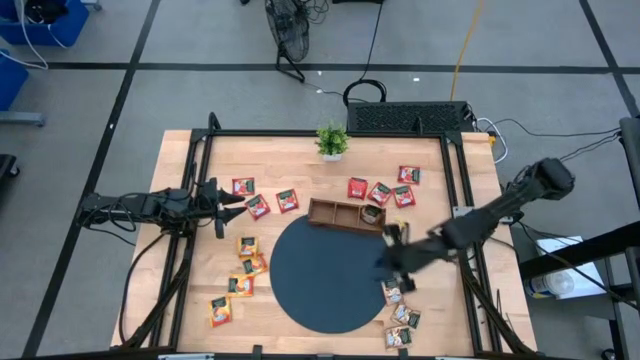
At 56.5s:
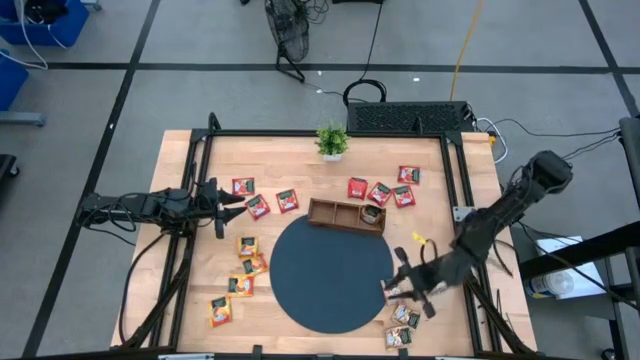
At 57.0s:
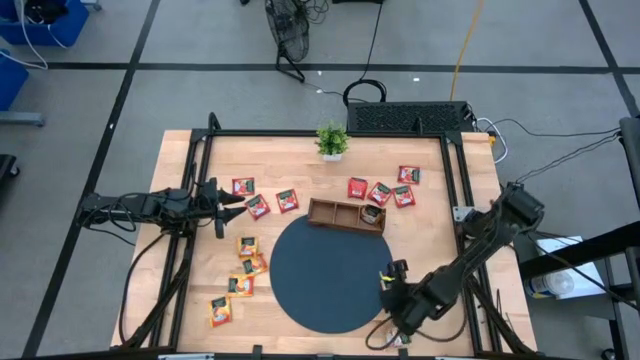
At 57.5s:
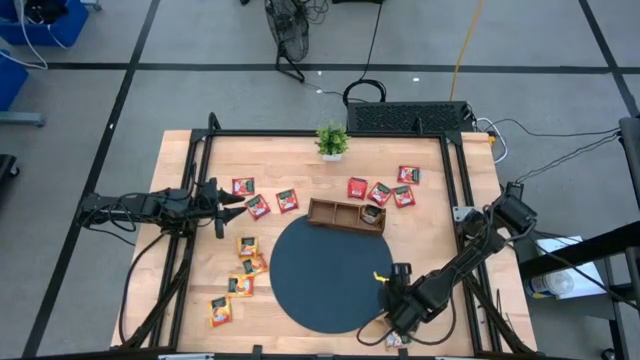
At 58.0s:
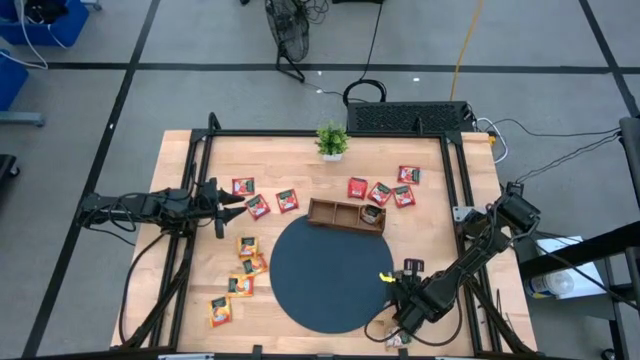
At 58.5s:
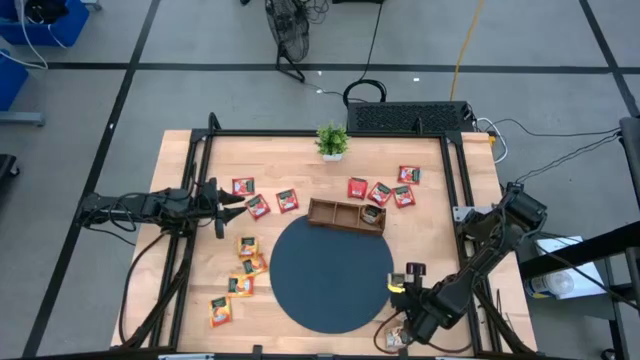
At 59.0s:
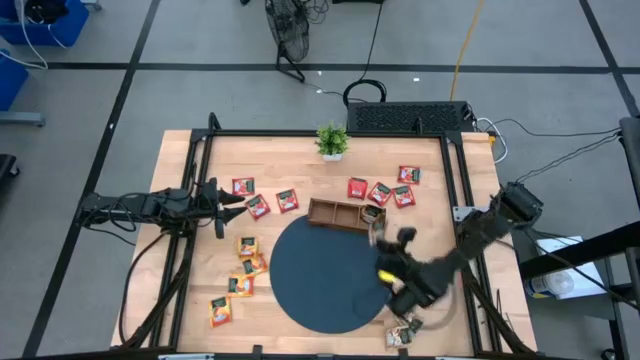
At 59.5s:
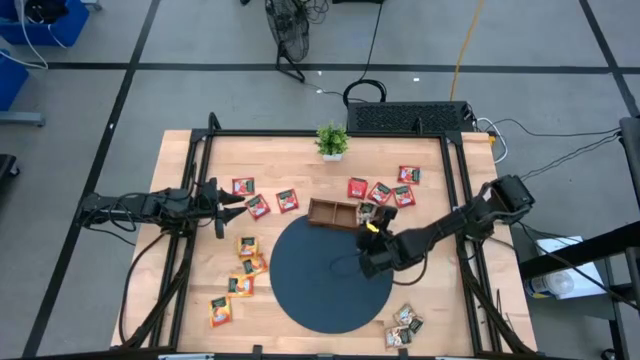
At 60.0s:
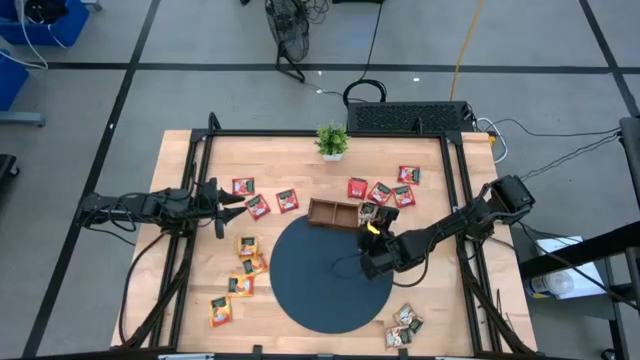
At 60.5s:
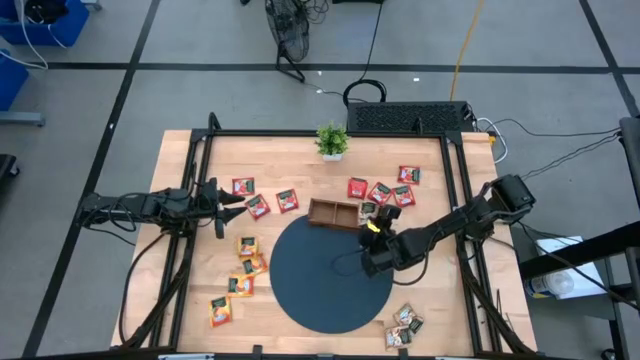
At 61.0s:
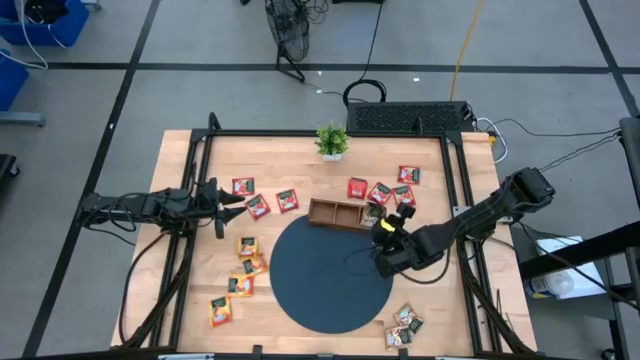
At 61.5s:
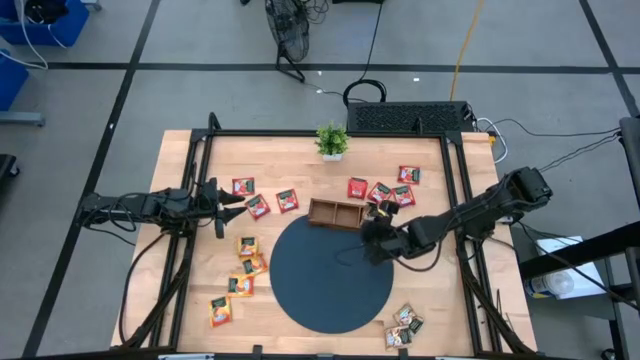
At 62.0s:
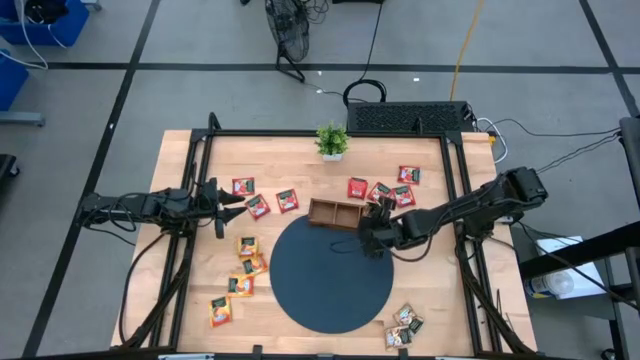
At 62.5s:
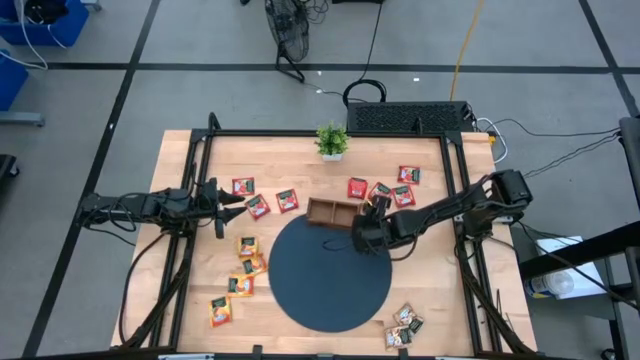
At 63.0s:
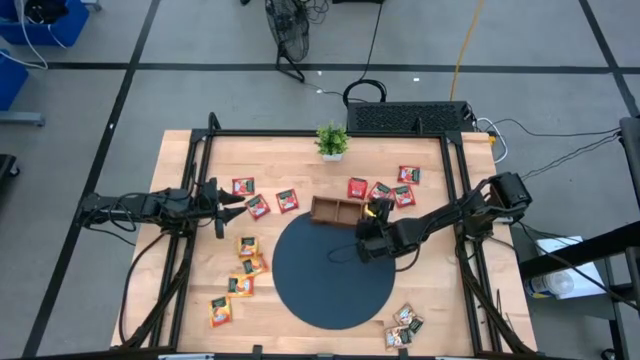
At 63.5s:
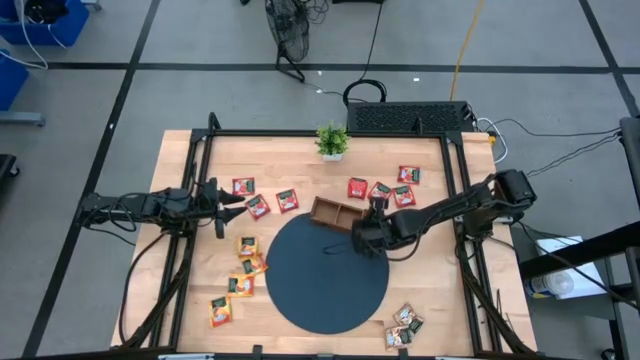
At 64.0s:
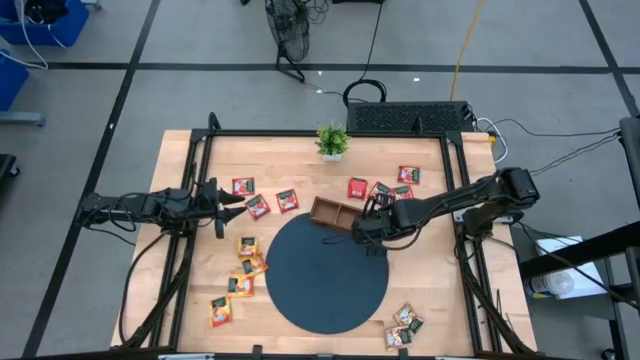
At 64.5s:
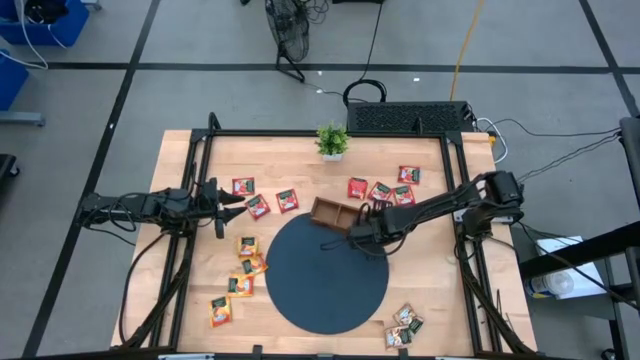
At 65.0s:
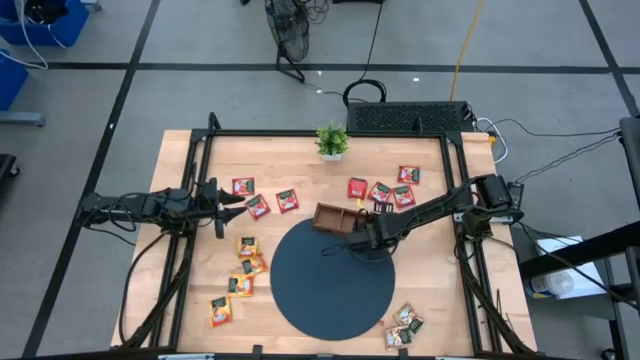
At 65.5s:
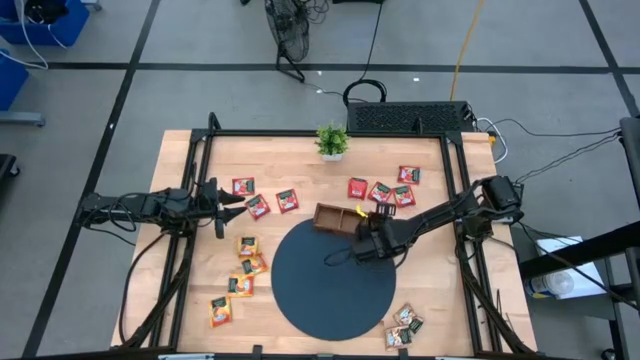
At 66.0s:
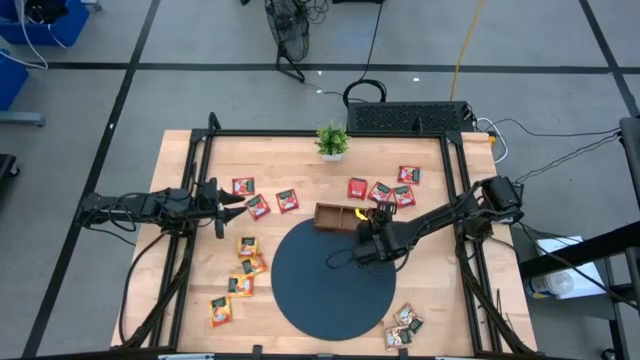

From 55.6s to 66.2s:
Task: Pick & Place Tea
Put the top brown tea bag into the right slot of the wooden organizer

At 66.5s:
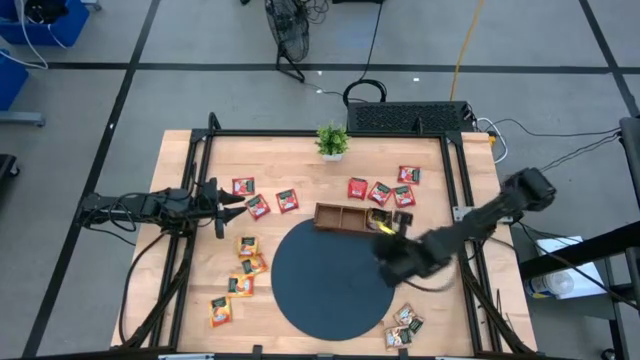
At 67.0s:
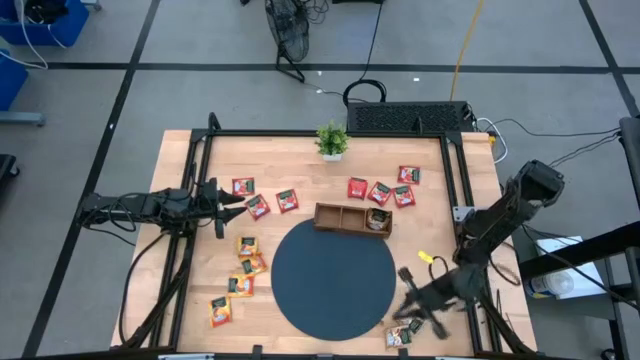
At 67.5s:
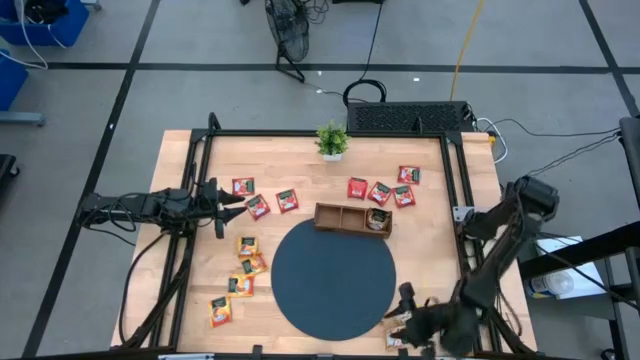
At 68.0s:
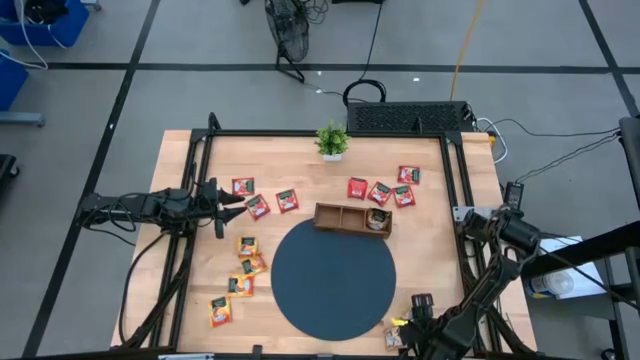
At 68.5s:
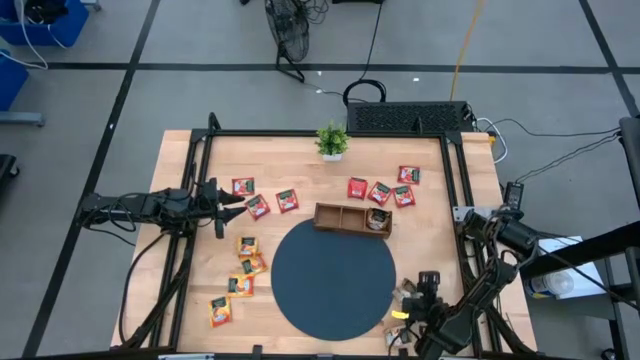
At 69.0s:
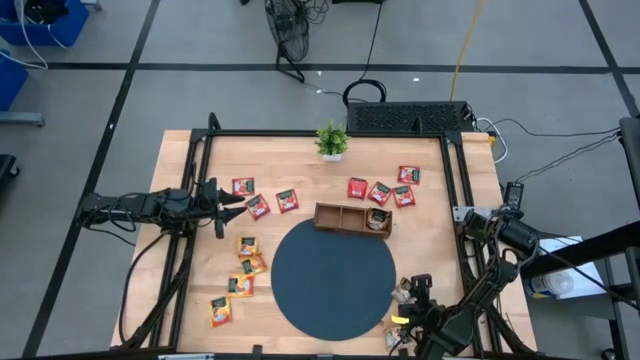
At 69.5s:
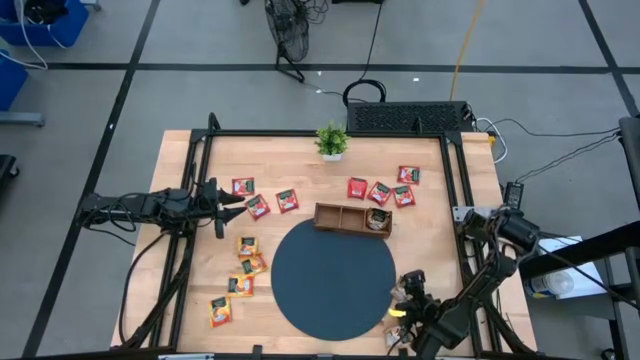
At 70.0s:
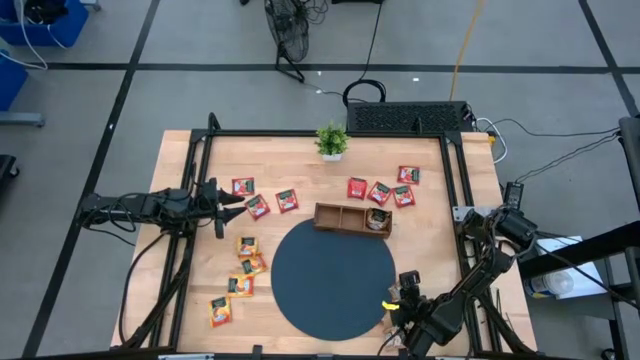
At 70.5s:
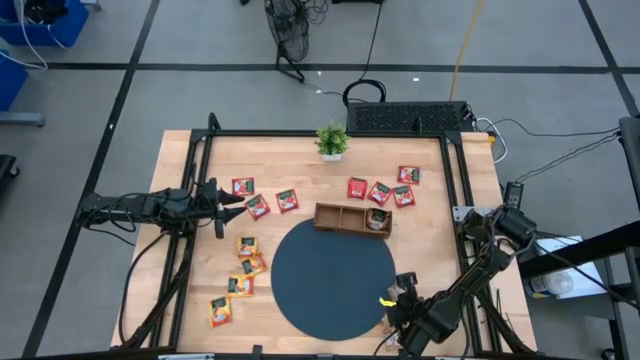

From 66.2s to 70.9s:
Put the top brown tea bag into the right slot of the wooden organizer

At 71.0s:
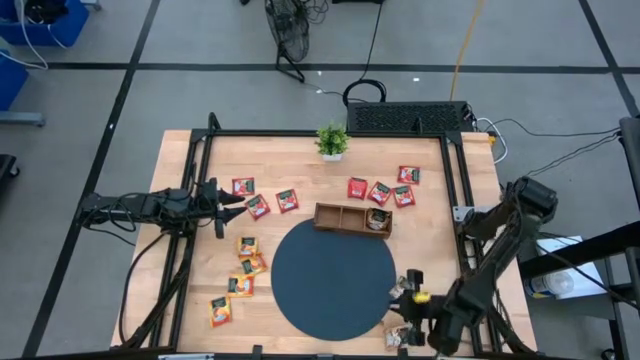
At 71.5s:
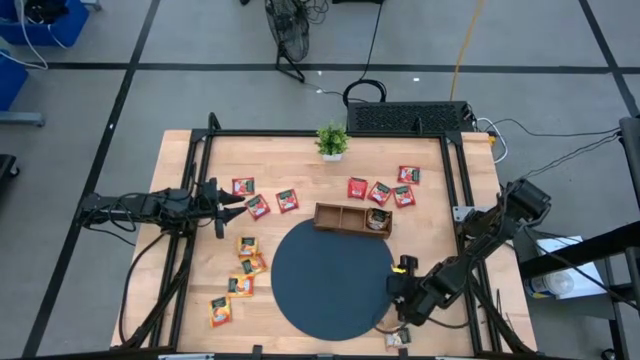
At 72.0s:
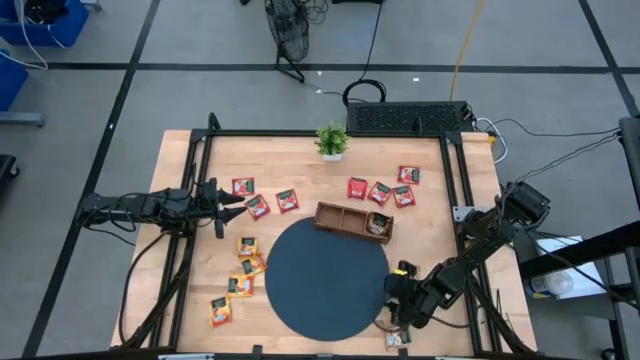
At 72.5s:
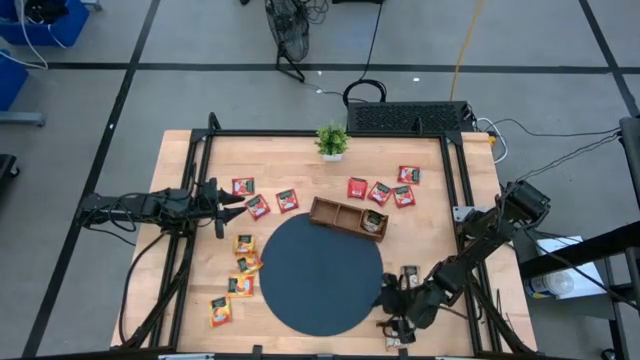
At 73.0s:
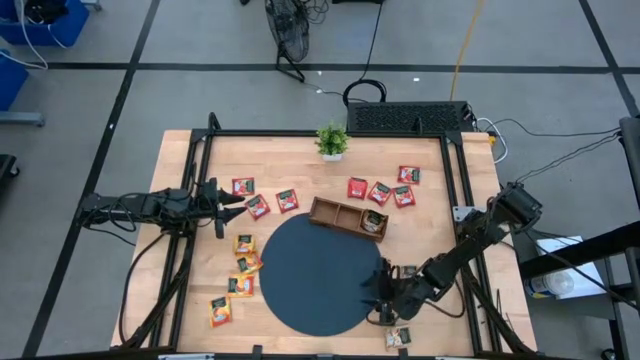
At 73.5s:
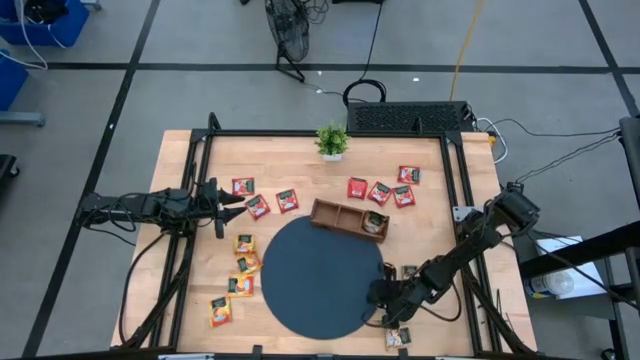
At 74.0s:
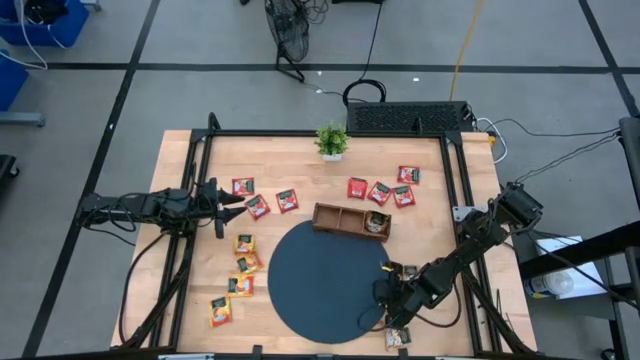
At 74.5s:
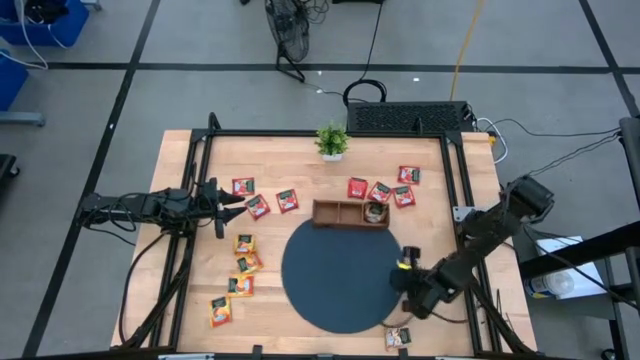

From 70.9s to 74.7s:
Adjust the mat on the table

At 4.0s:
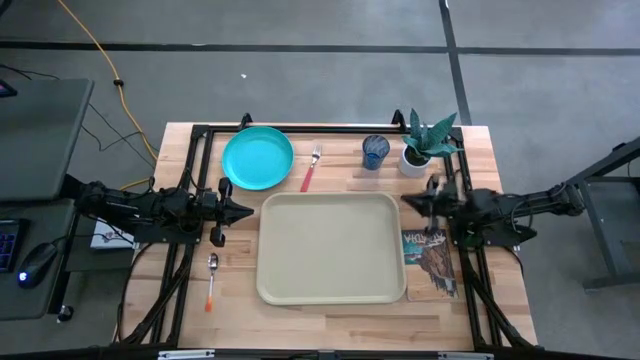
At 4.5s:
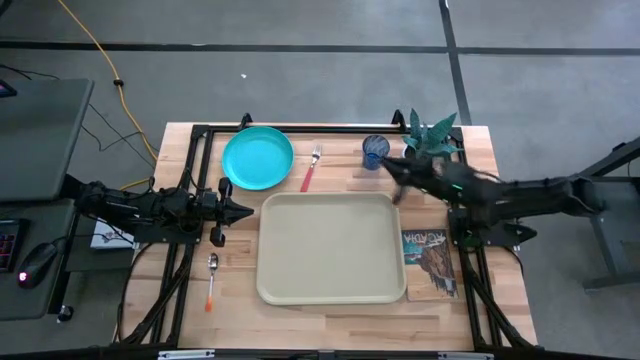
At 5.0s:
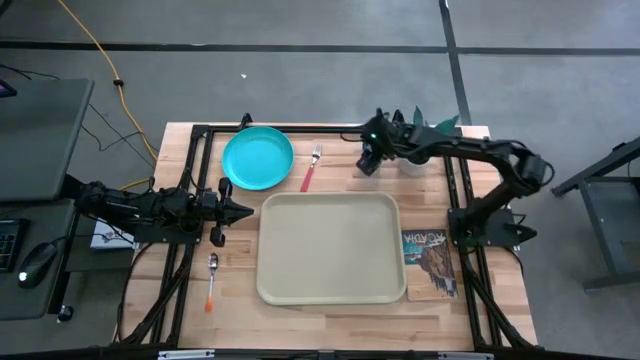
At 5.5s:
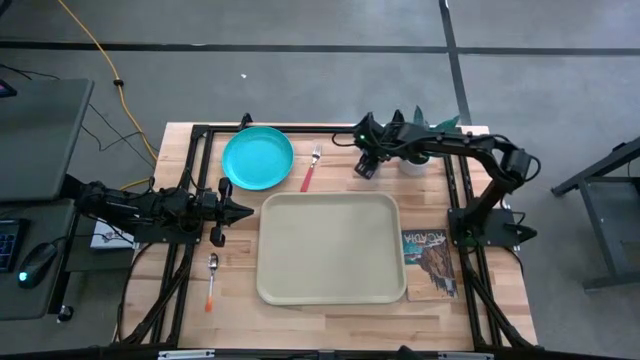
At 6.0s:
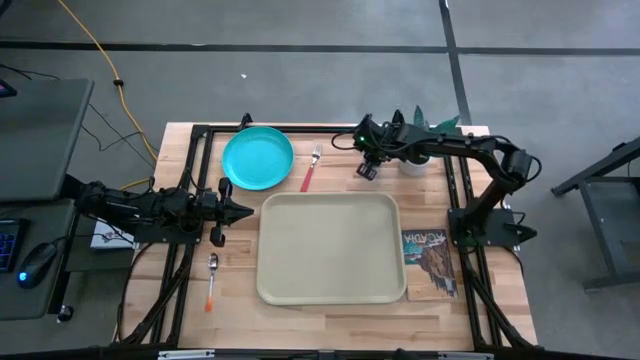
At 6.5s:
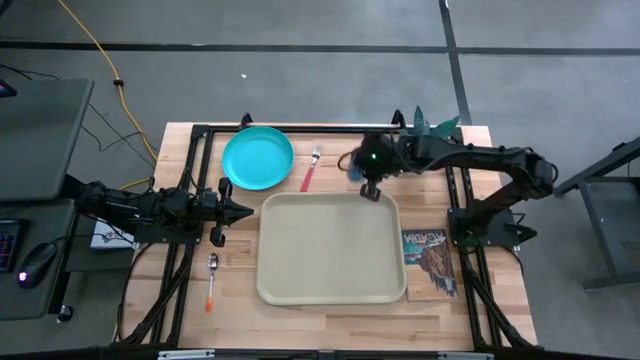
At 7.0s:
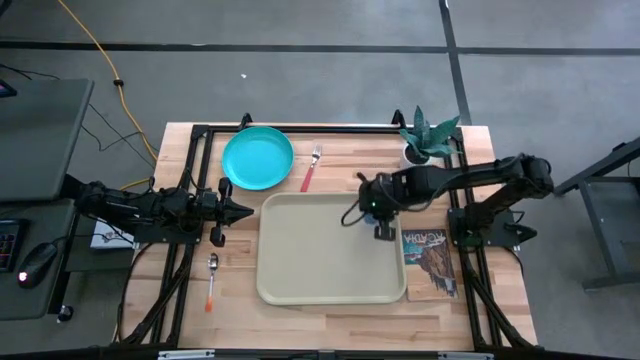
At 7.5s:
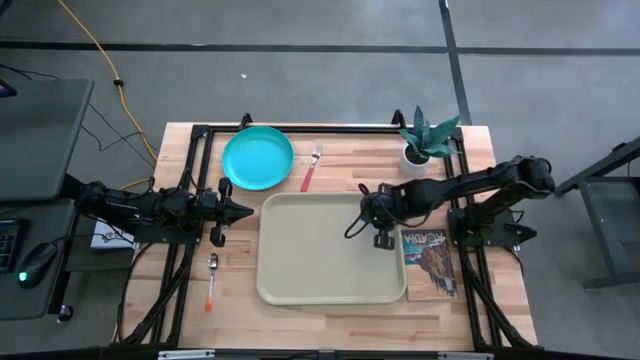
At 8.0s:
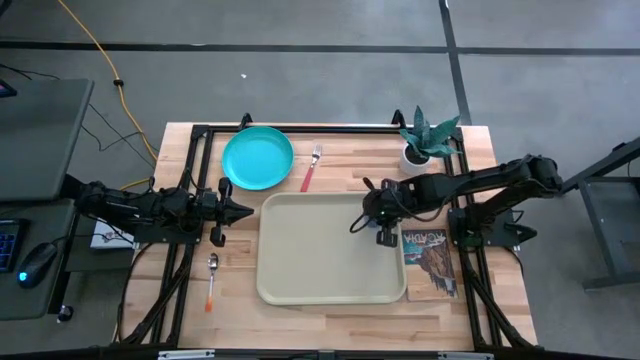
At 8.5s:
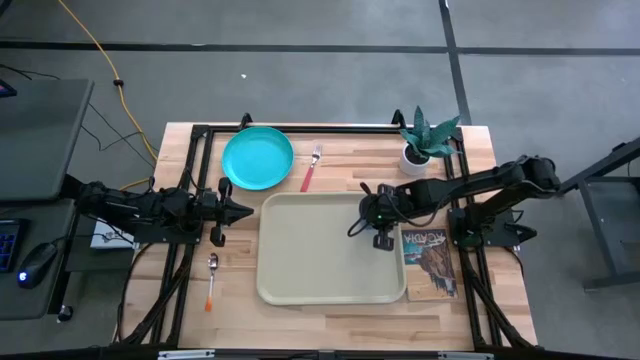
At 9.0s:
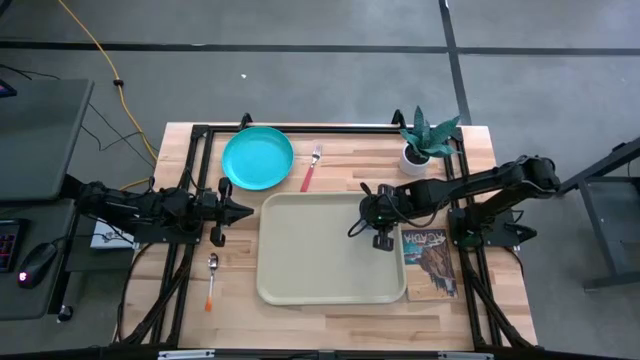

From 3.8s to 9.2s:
Task: Pick and place plate/cup/fork/spoon on tray
Put the blue cup on the gray serving tray
